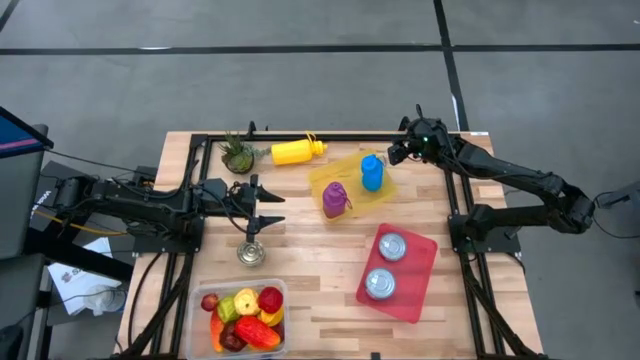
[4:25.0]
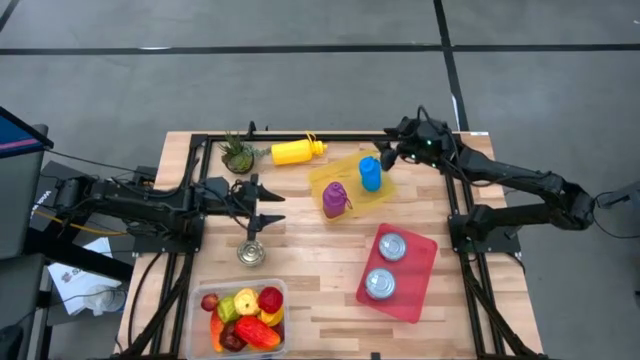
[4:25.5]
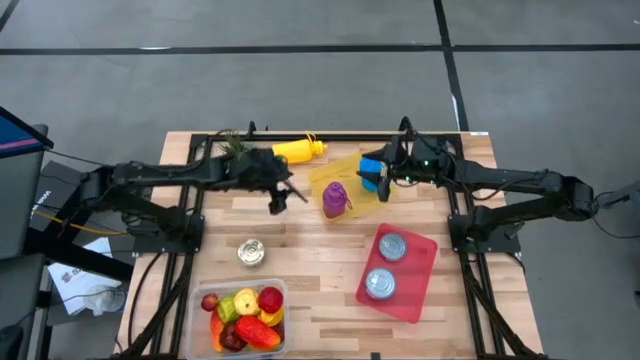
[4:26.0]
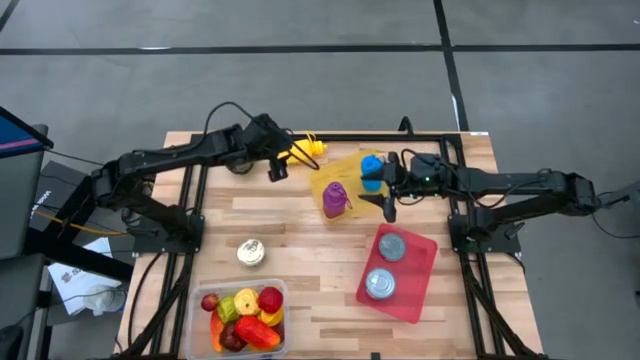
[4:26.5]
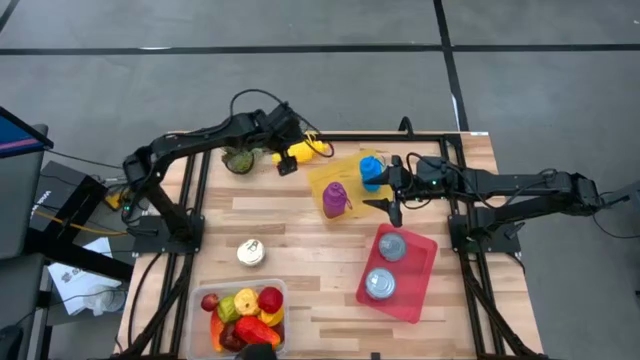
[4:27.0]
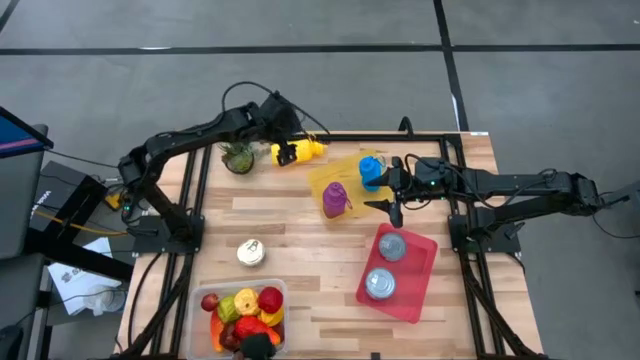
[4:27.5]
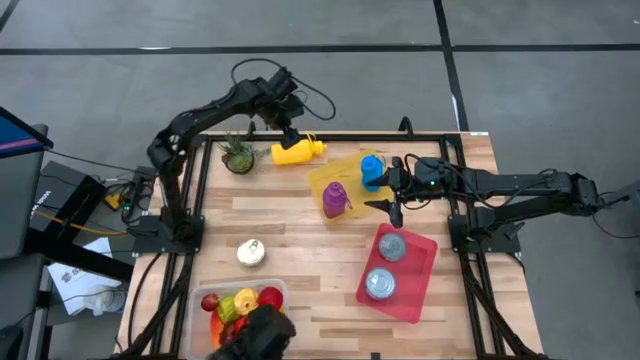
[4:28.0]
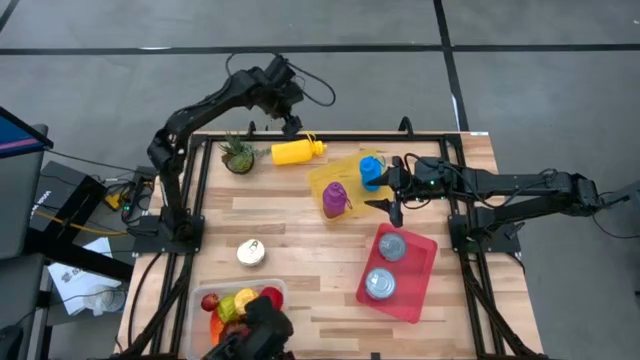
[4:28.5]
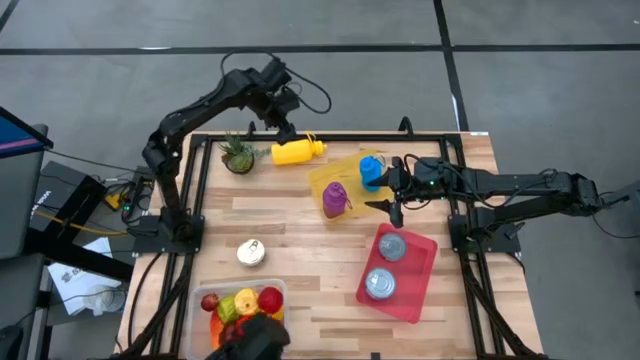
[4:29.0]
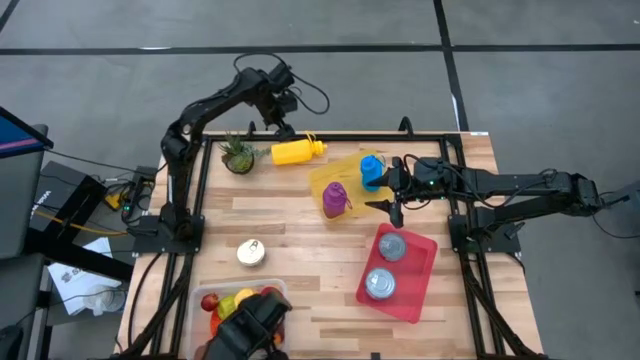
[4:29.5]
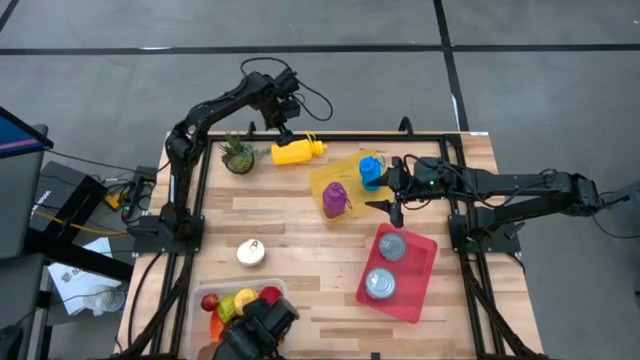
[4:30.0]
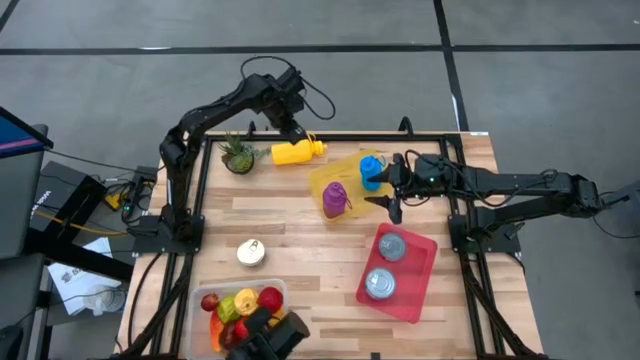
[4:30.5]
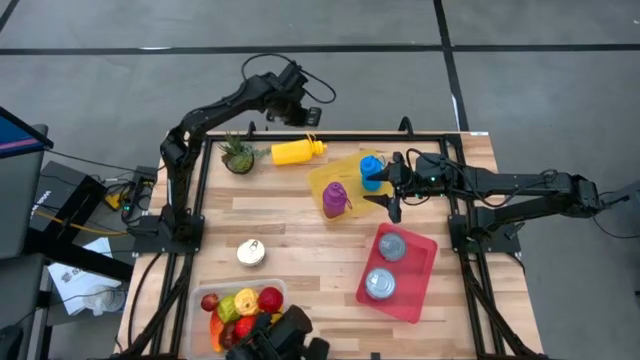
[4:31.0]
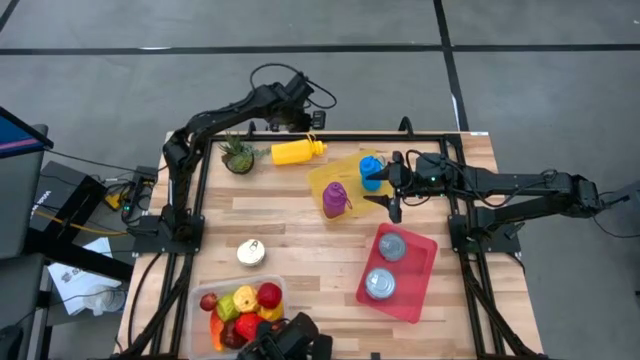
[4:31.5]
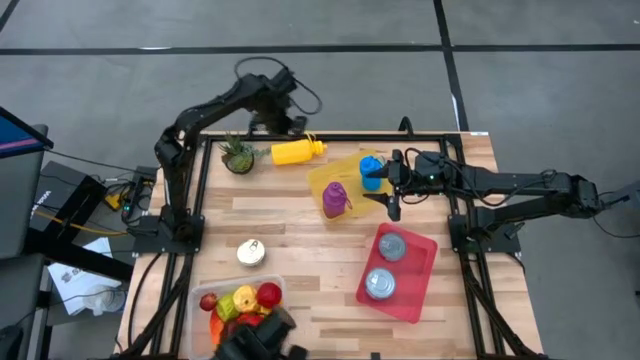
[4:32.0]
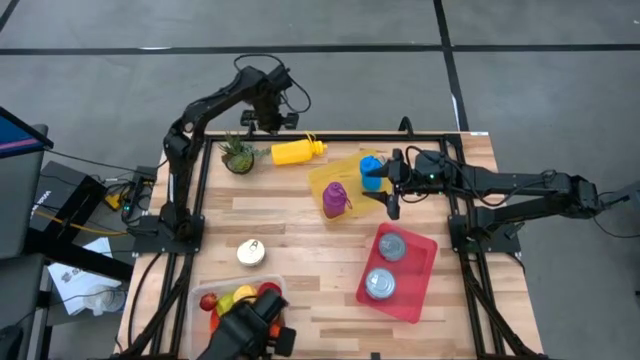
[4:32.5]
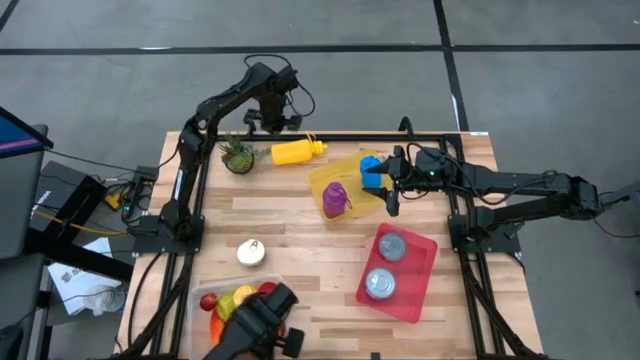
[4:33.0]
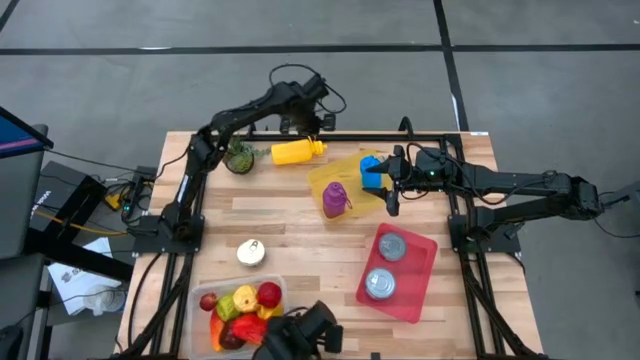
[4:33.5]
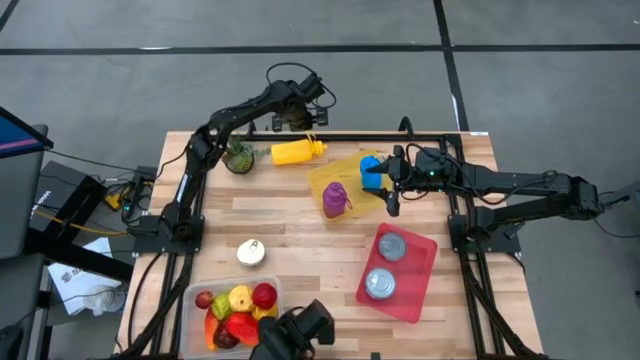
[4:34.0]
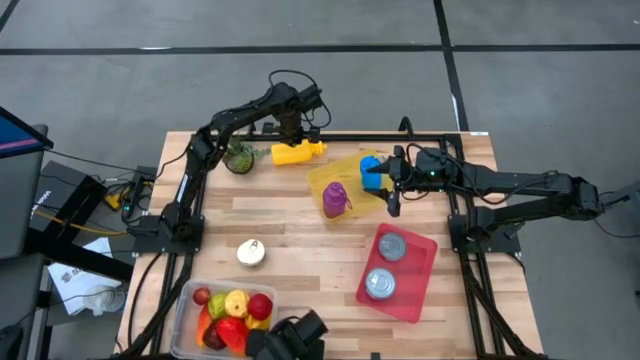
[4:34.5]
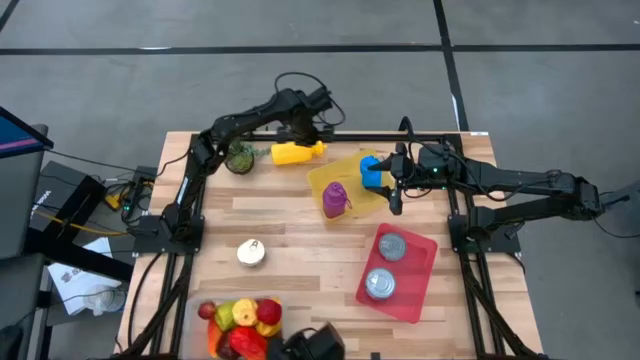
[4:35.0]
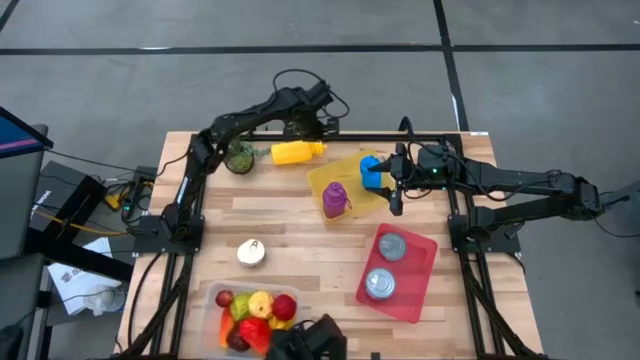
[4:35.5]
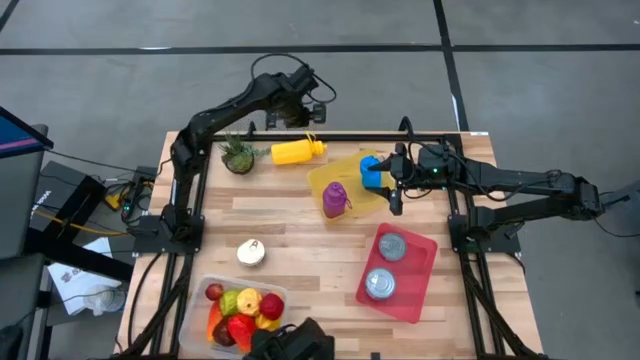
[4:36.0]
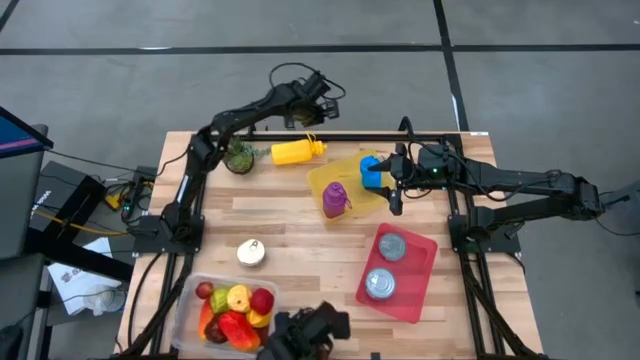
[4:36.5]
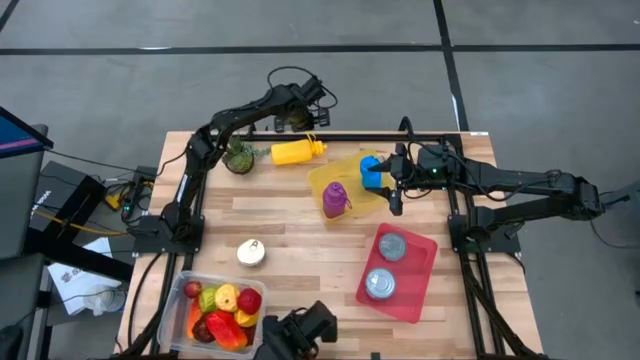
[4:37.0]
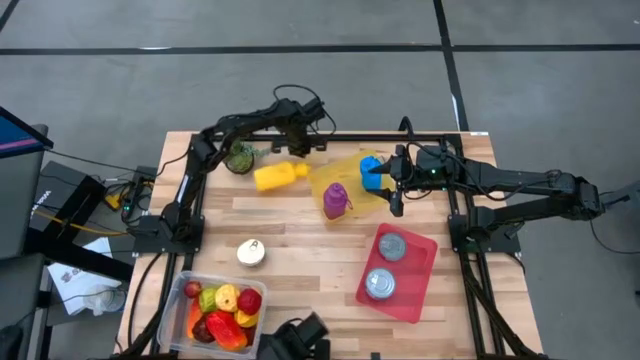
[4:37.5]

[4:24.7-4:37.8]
Task: Pick & Place Food Item
Put the yellow tumbler into the yellow bin

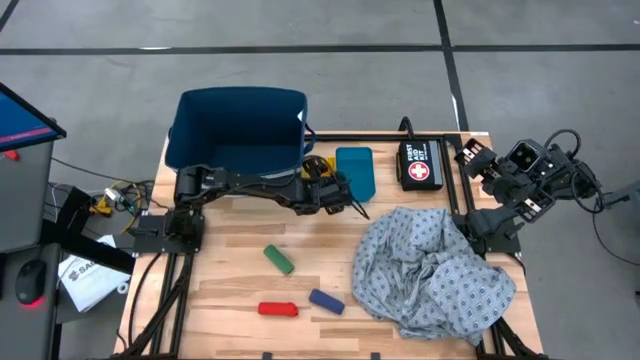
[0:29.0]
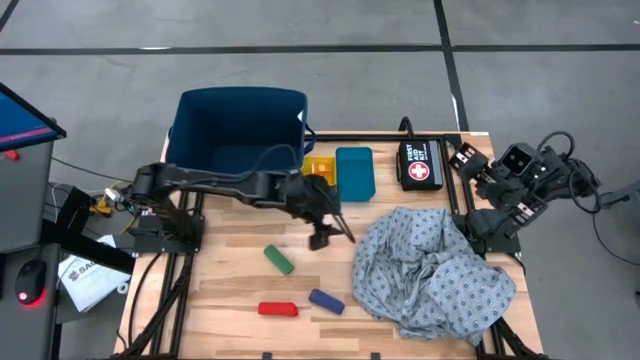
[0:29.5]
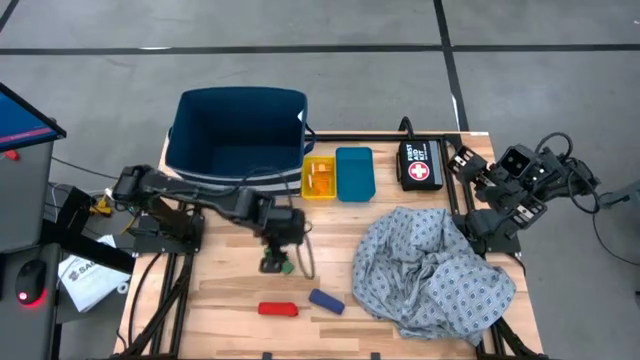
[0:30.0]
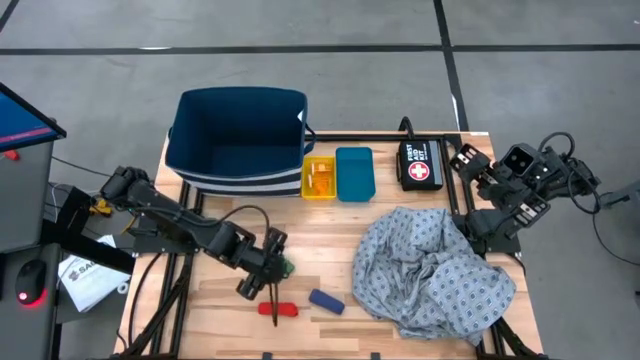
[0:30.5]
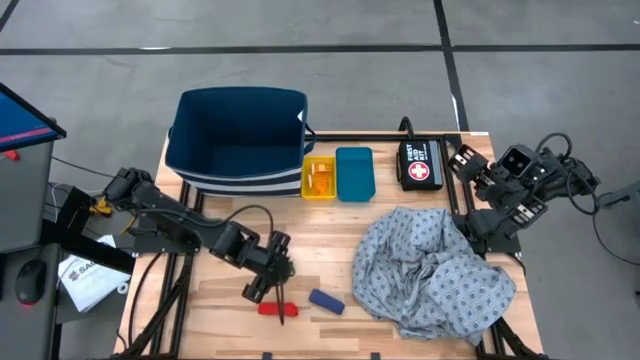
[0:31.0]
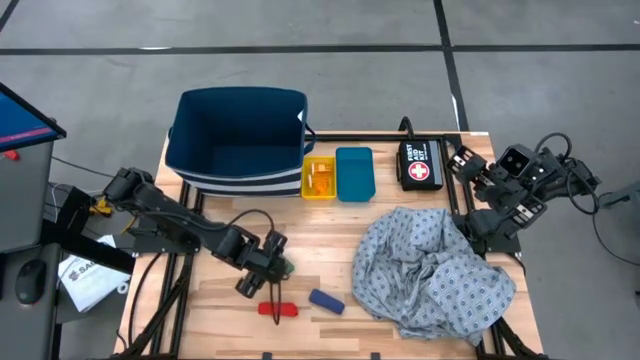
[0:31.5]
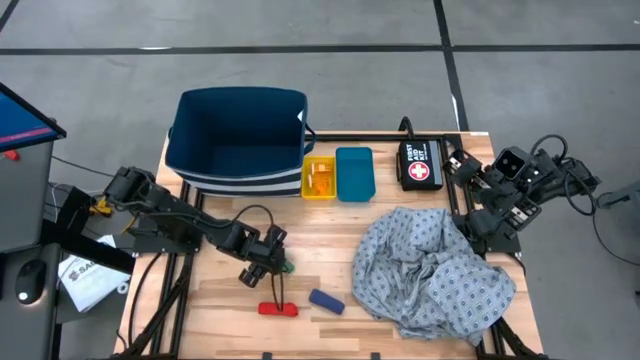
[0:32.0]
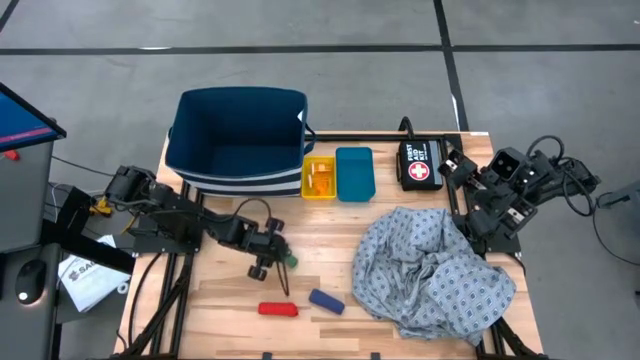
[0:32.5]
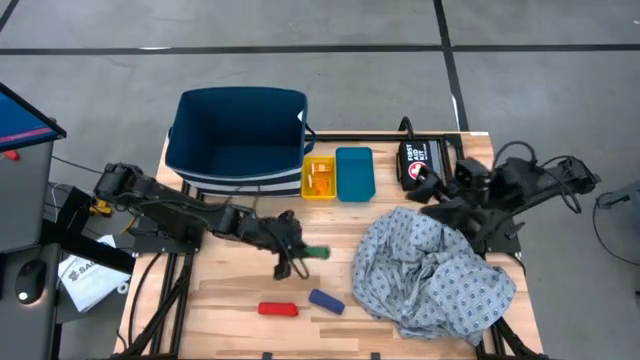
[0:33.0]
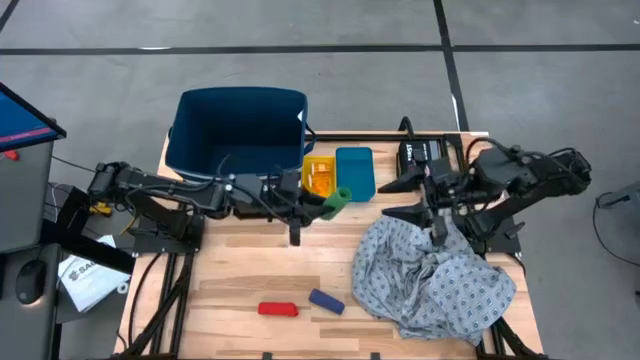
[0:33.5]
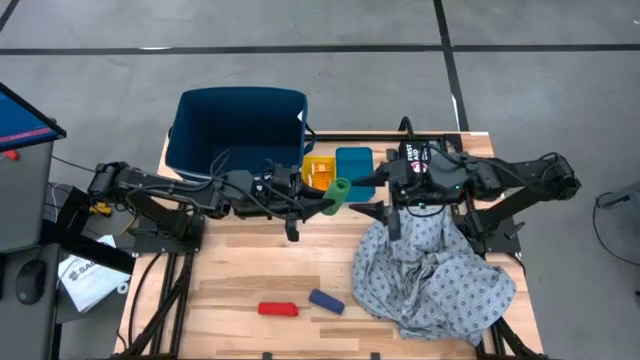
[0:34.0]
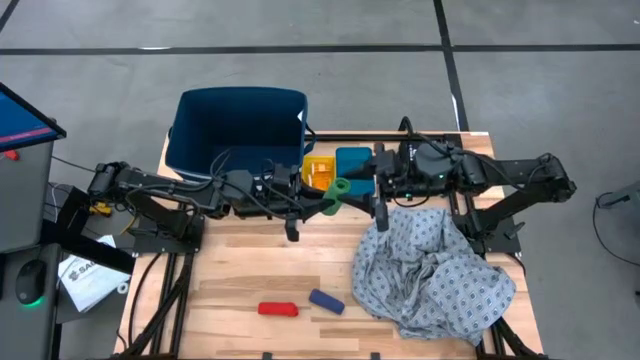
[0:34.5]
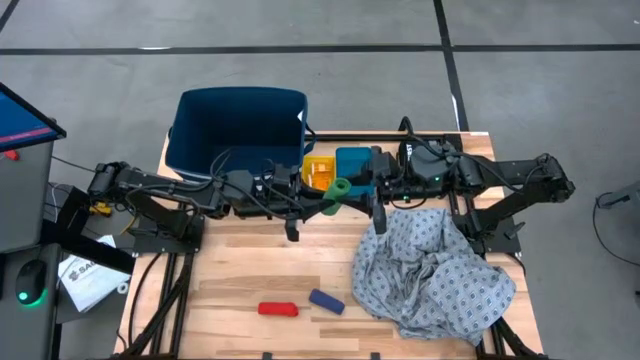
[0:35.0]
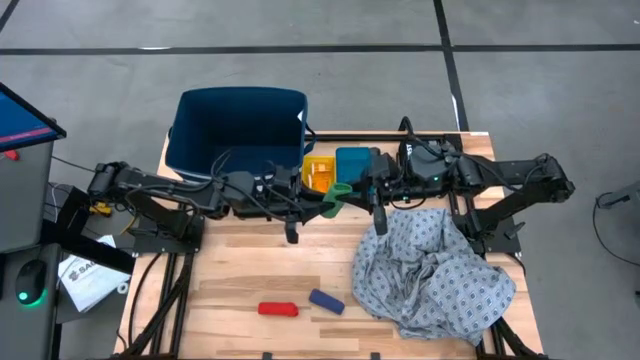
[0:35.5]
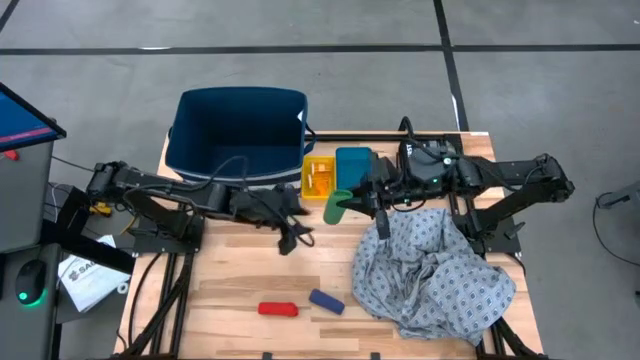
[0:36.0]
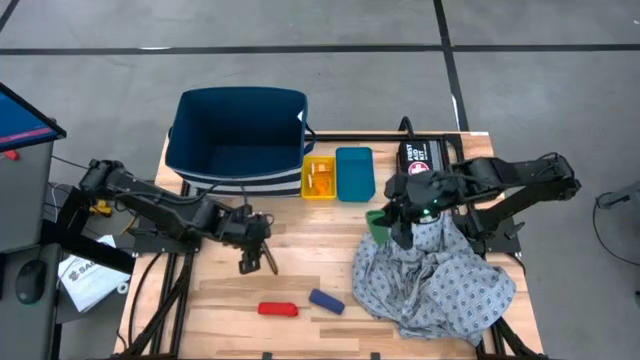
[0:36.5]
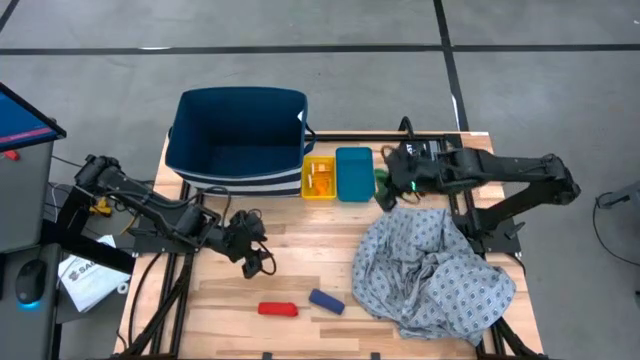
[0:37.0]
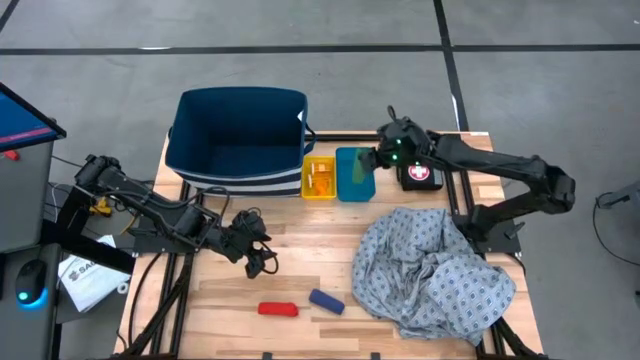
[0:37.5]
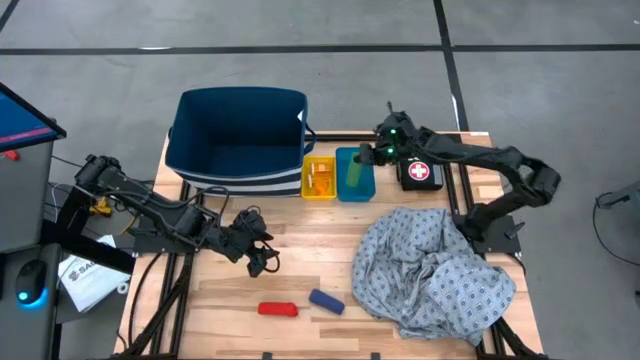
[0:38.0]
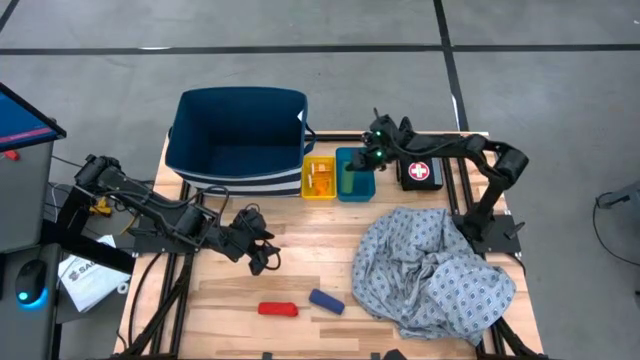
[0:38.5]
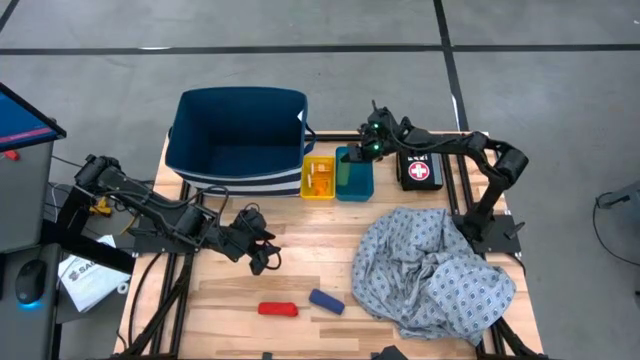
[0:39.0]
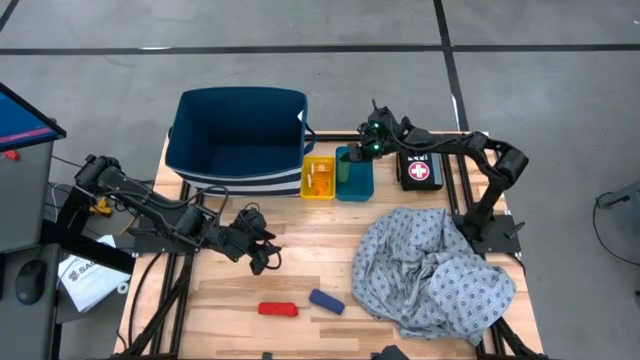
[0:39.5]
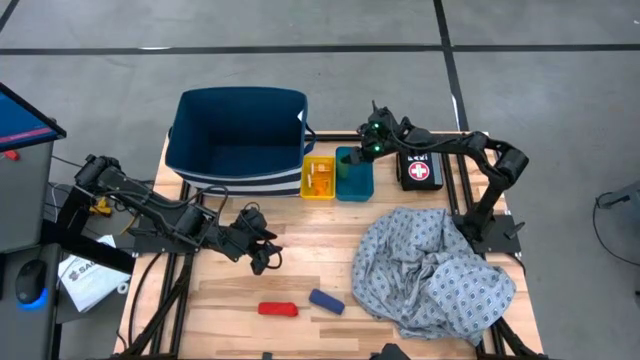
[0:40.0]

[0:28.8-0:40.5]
Task: Pick & place medical supplies in basket/bin
Put the green bandage into the right blue bin
